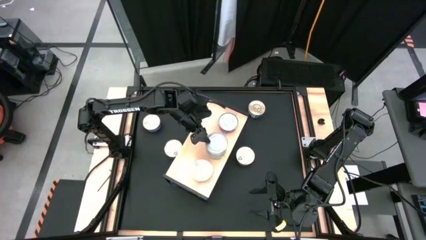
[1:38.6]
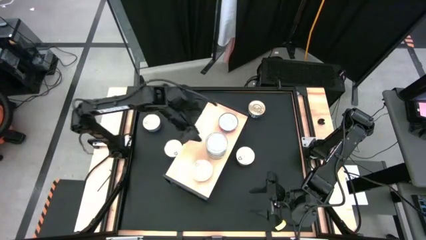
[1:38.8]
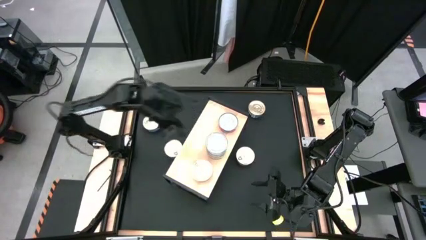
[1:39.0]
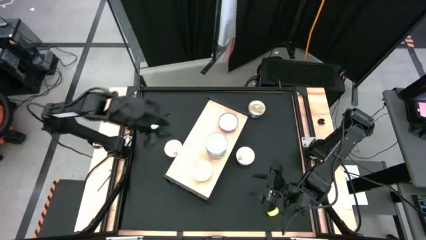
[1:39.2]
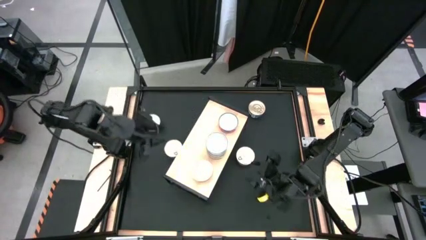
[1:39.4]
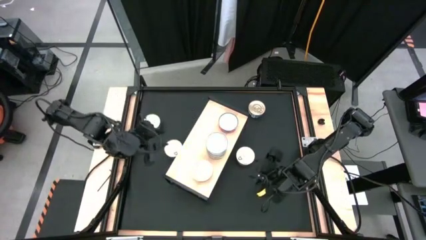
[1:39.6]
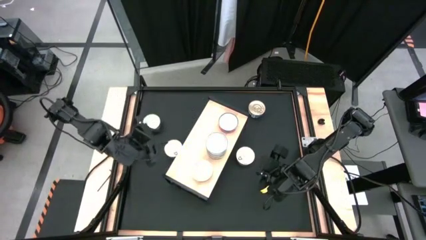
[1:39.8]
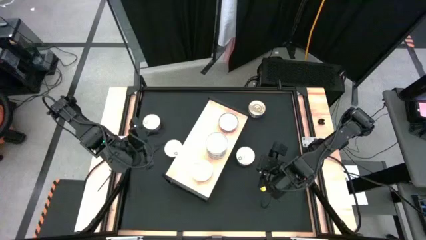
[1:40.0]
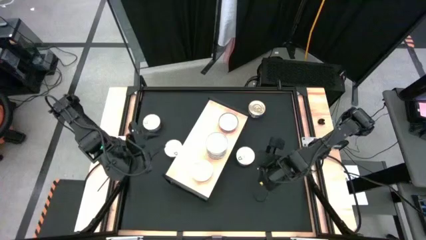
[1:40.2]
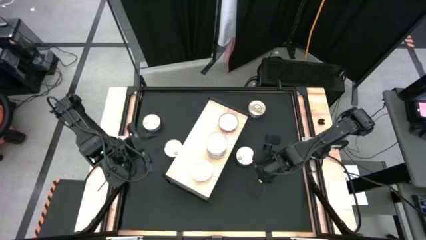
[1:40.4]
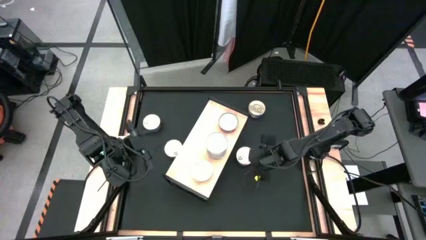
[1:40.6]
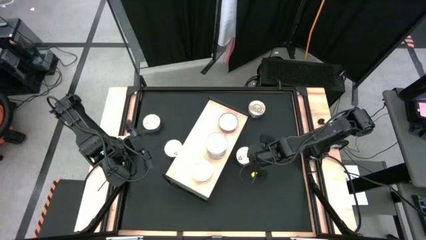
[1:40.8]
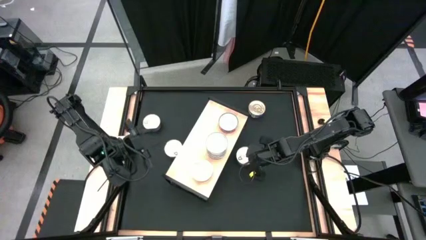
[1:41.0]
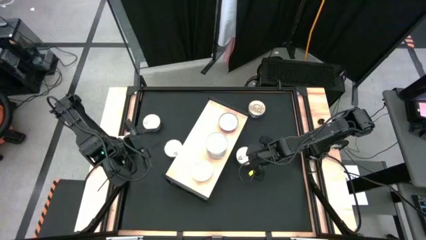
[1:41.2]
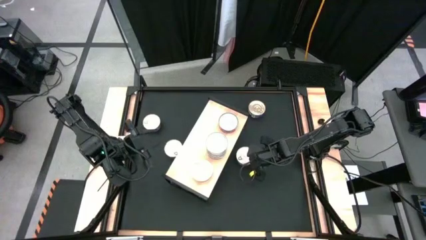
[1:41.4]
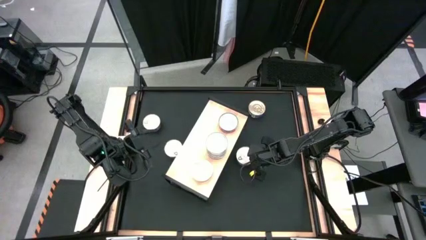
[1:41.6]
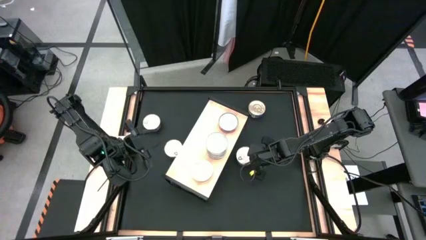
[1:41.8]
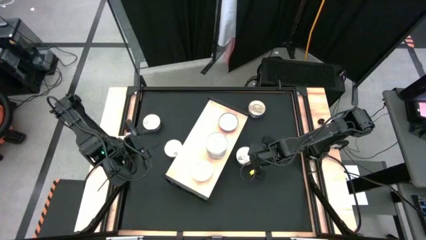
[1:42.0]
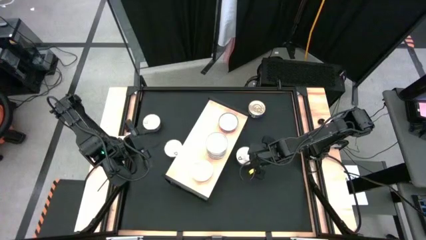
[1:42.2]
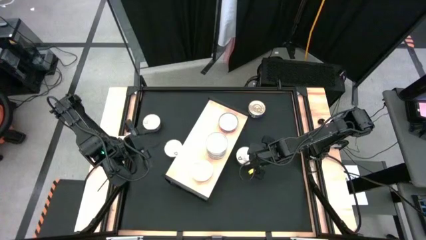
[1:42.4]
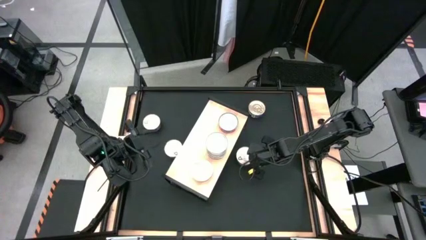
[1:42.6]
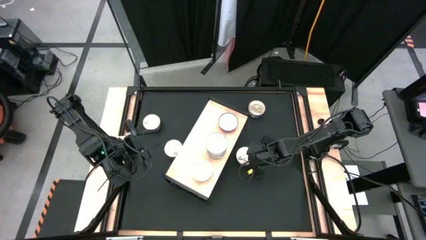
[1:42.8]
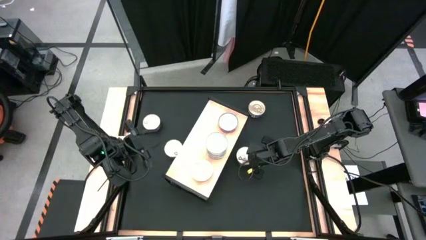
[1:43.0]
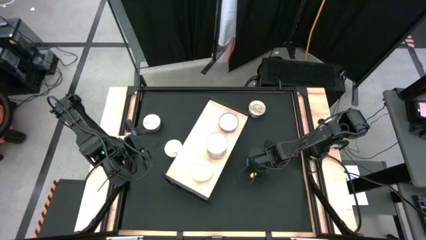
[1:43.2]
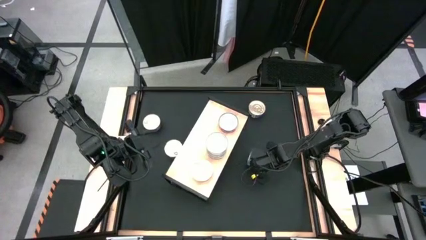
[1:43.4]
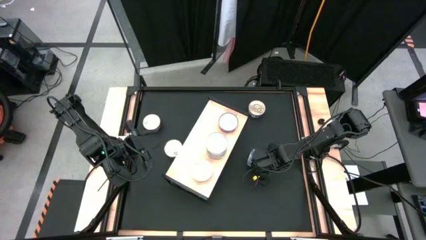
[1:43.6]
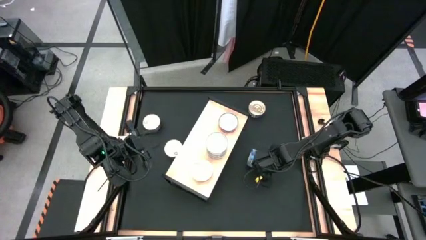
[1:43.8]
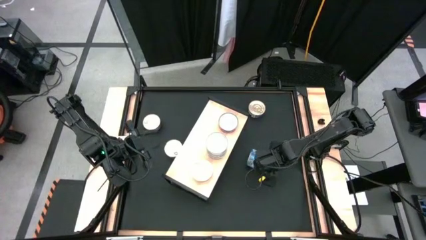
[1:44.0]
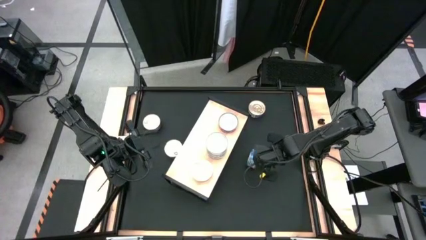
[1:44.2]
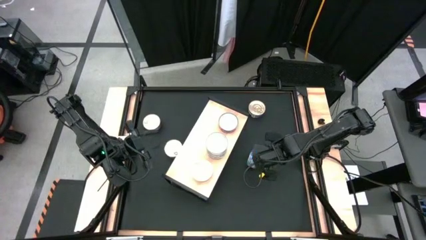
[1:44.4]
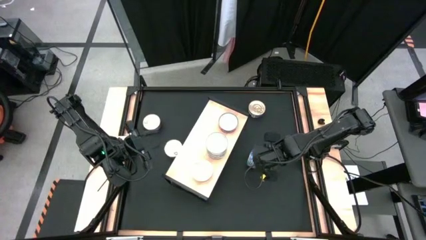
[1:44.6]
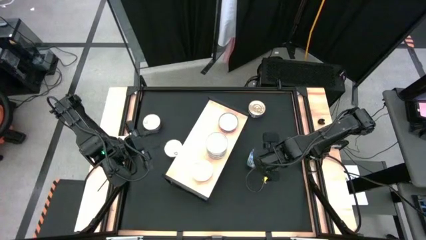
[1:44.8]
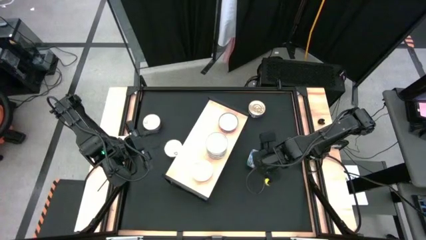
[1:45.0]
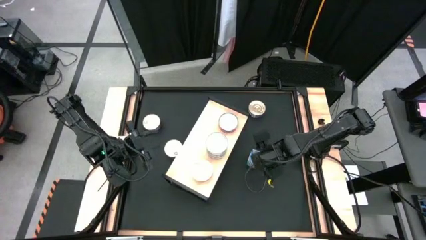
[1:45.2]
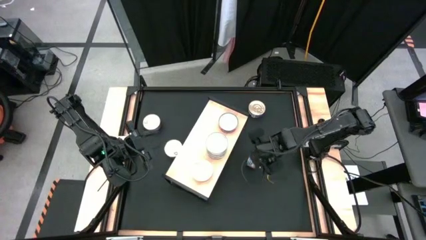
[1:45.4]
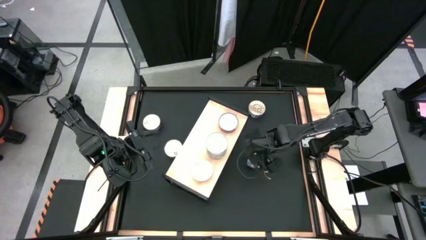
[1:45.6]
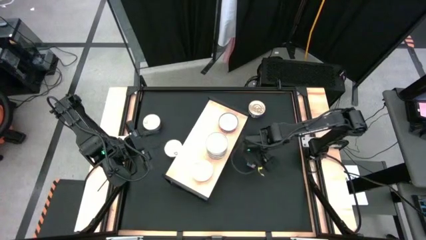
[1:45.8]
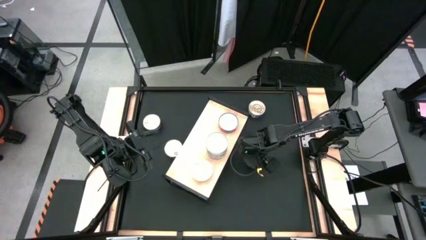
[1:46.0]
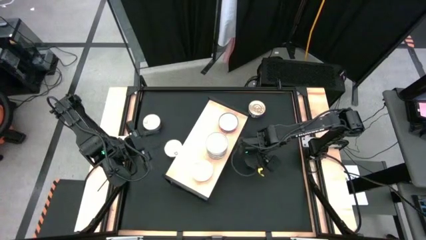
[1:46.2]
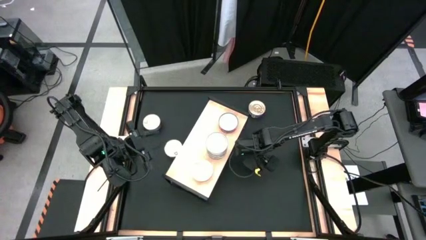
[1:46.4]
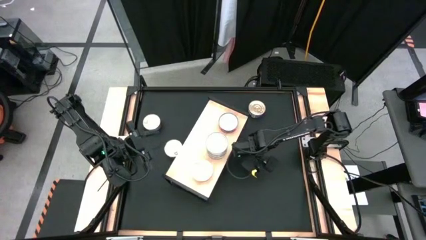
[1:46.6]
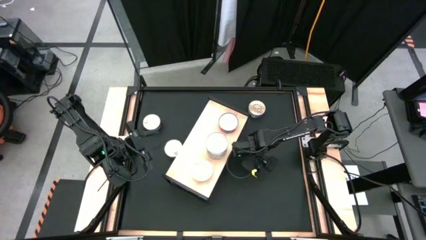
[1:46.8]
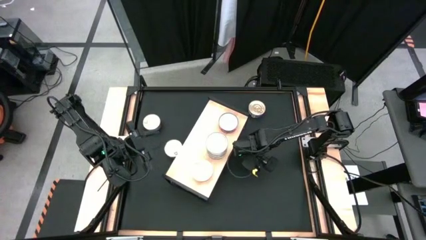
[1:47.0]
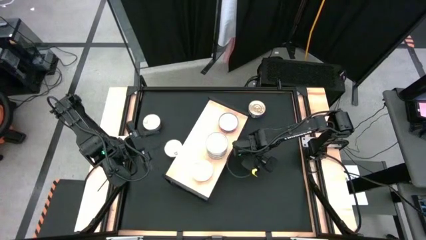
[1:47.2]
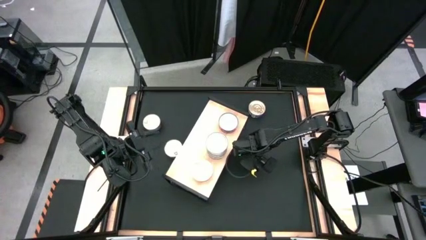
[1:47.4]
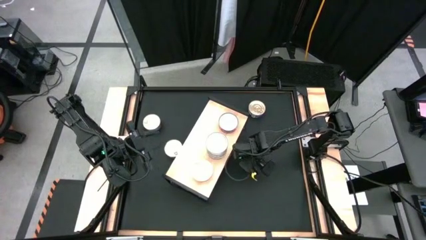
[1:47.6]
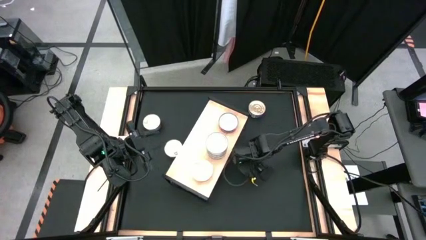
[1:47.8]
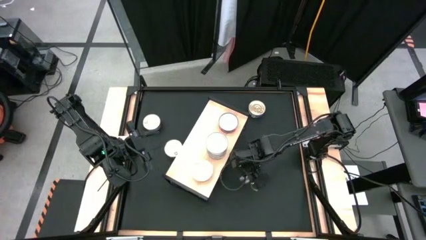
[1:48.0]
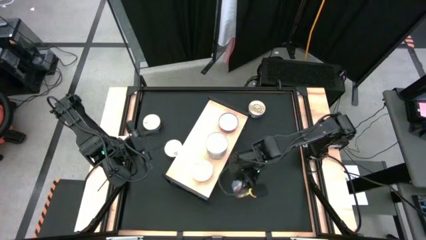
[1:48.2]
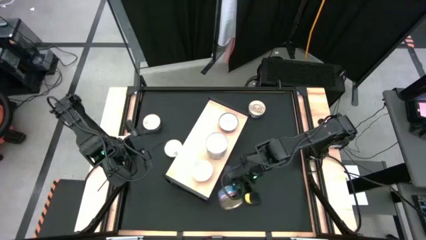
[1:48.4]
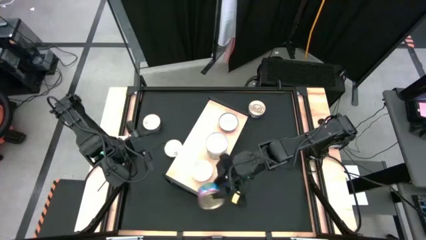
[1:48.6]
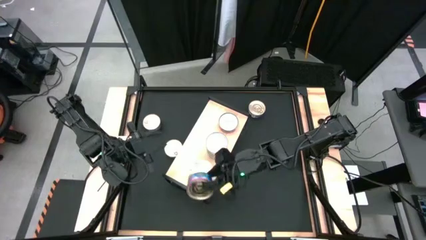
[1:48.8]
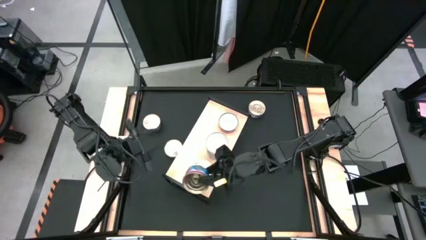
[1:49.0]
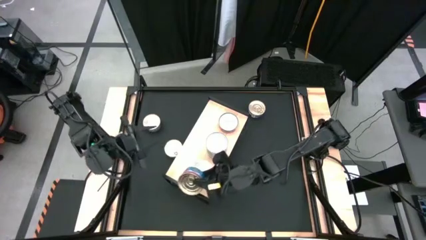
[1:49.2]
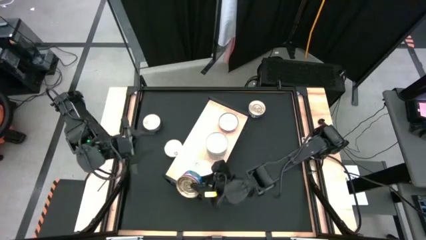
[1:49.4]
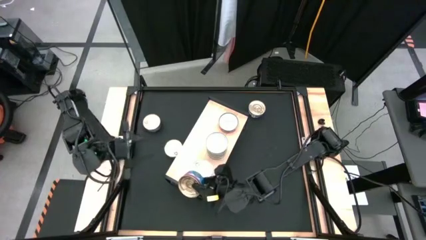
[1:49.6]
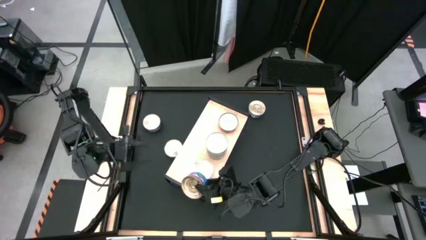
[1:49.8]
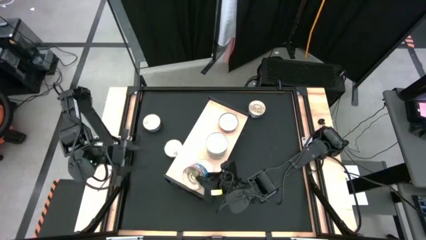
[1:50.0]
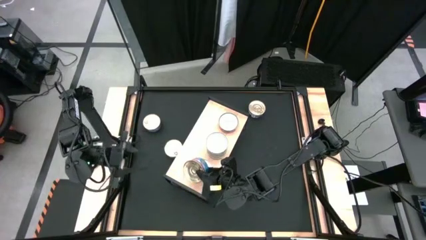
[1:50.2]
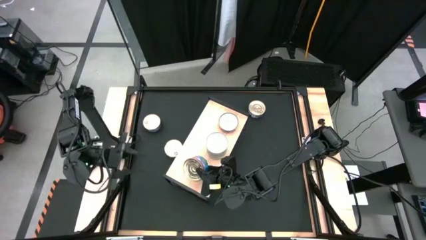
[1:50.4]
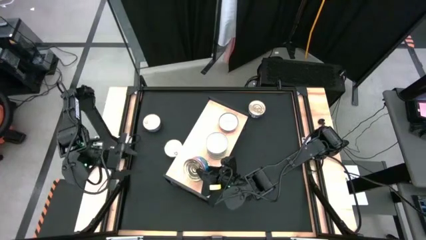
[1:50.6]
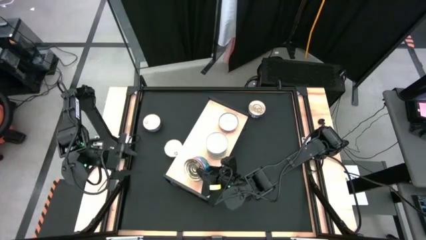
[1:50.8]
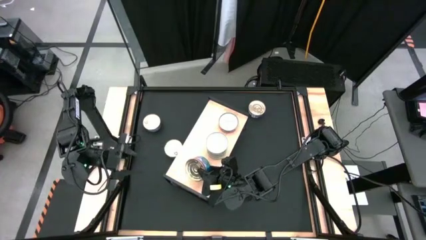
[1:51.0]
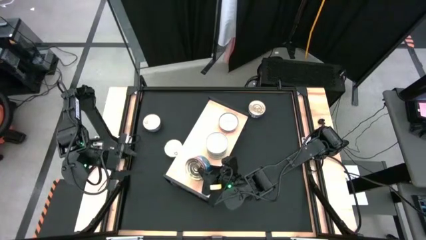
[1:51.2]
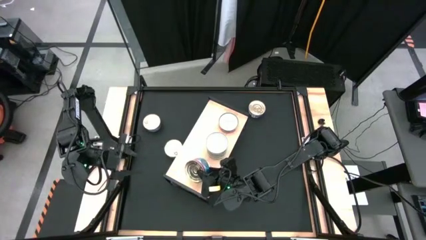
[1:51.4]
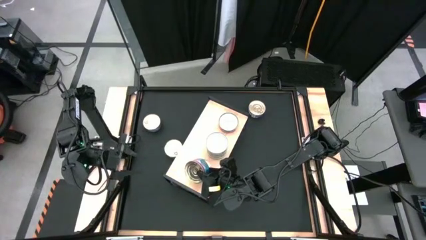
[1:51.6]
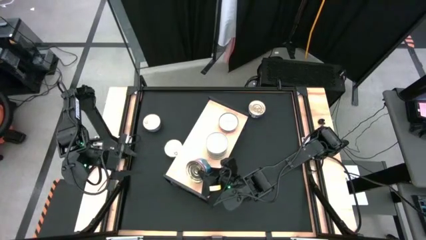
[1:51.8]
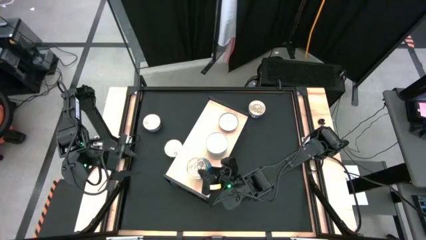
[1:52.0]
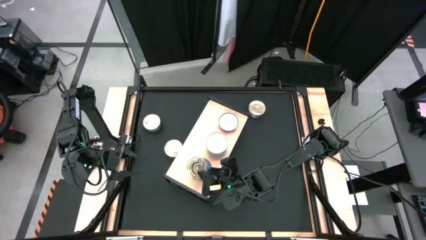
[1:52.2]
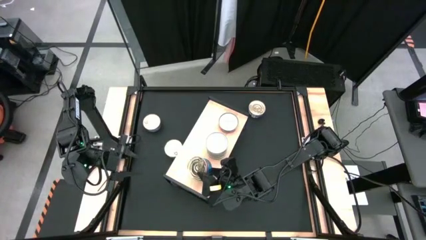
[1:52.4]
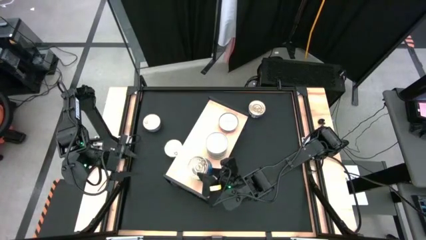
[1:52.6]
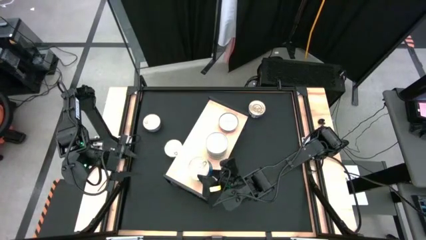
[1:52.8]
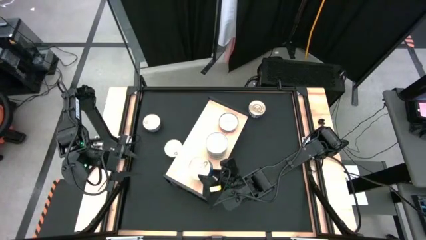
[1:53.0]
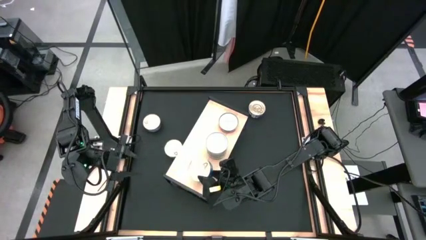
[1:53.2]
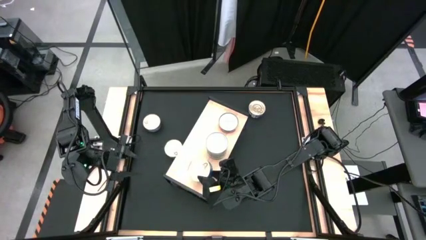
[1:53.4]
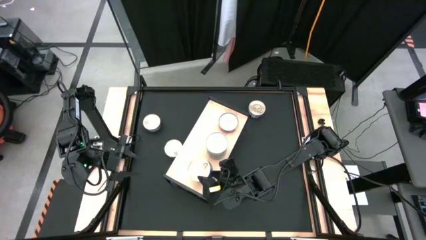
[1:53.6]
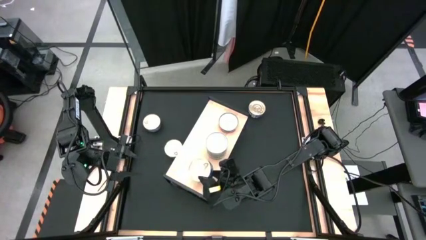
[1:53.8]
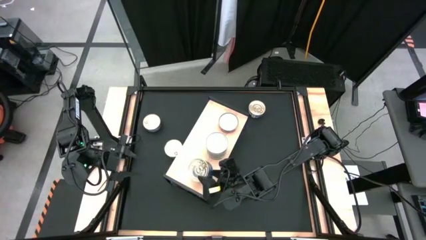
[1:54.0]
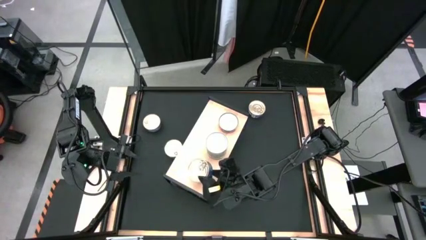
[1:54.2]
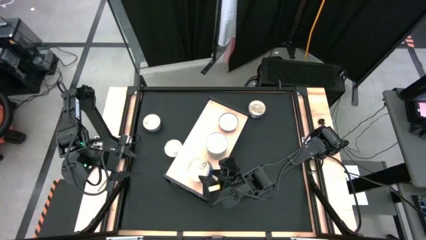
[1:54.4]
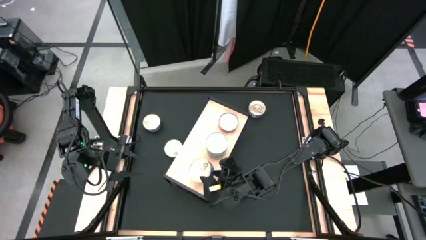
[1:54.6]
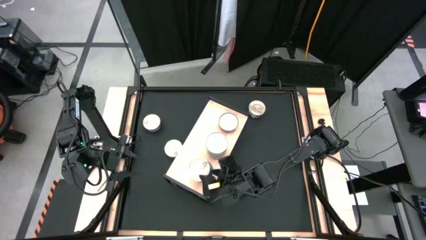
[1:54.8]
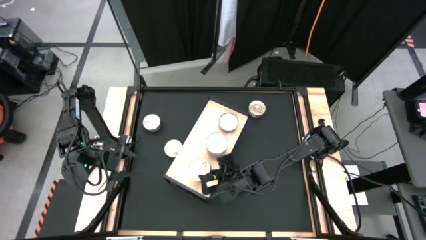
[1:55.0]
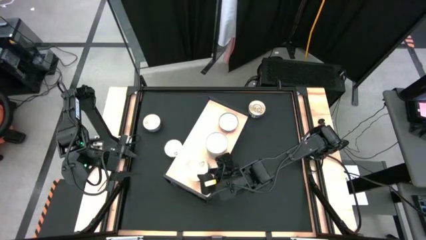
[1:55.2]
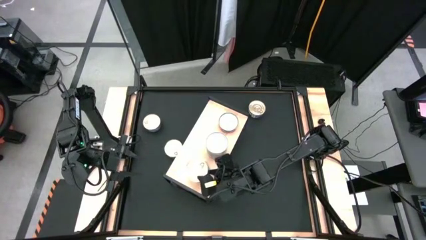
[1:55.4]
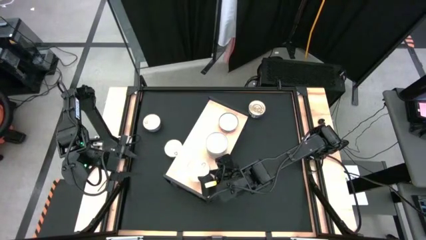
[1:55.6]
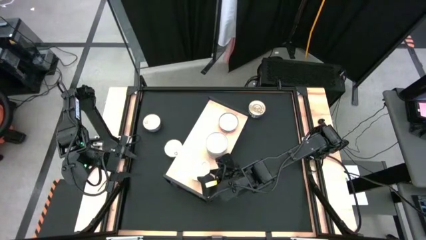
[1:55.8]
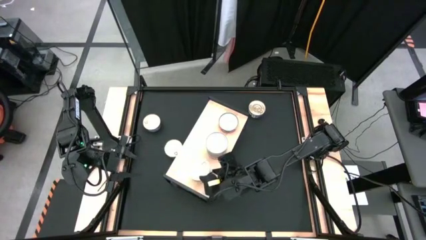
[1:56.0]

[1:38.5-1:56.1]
Task: Stack canned seafood by type on shelf
Stack the blue tuna can on top of the other blue tuna can on the shelf
